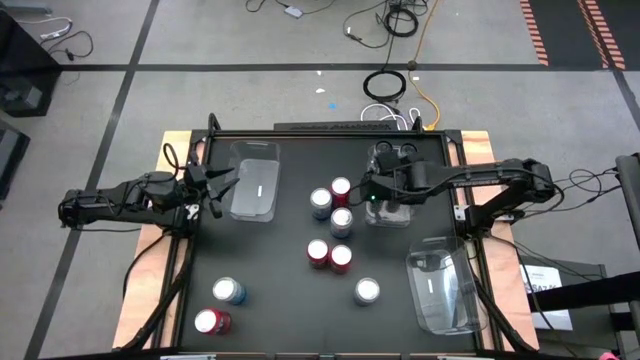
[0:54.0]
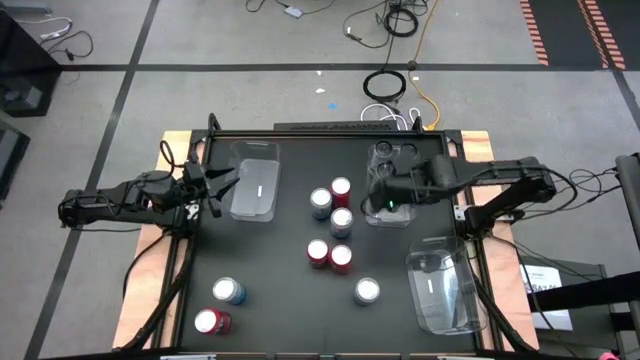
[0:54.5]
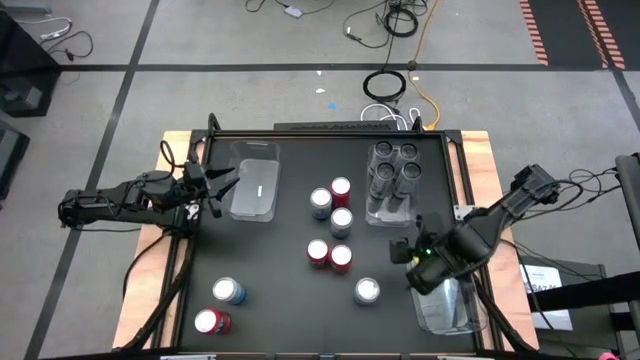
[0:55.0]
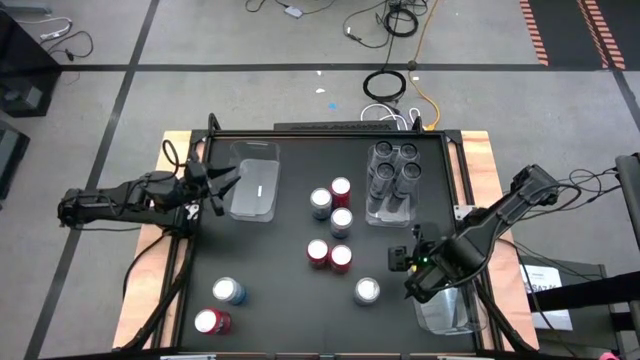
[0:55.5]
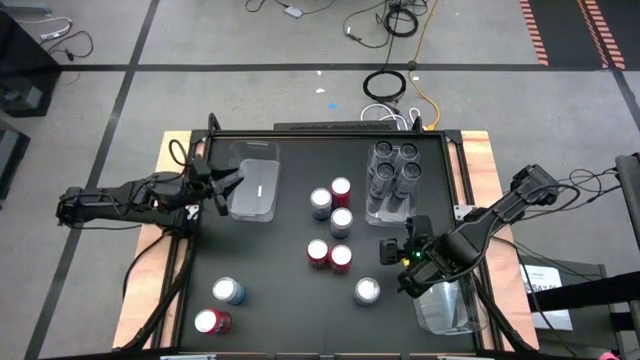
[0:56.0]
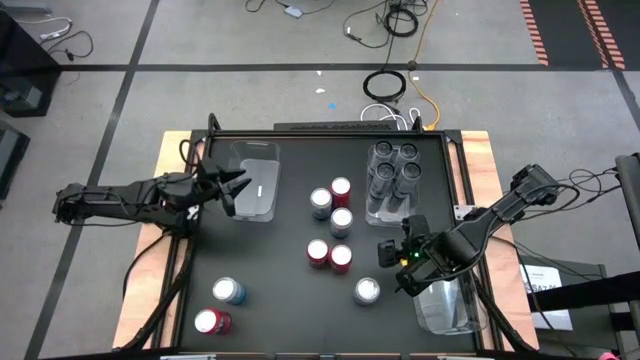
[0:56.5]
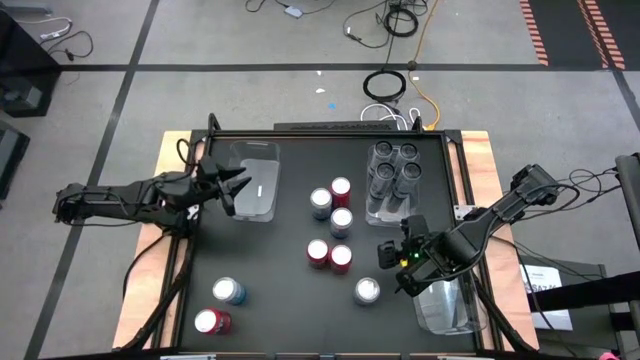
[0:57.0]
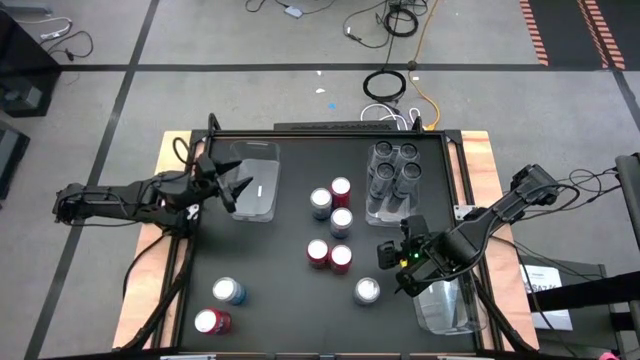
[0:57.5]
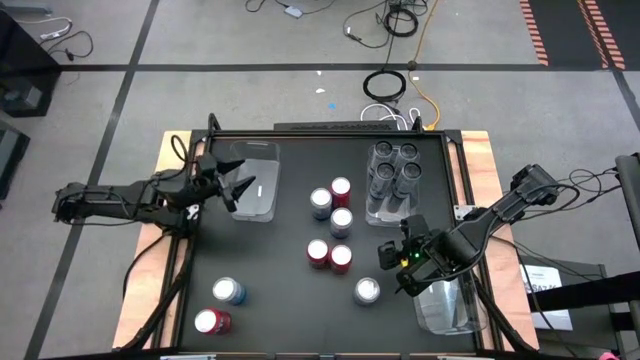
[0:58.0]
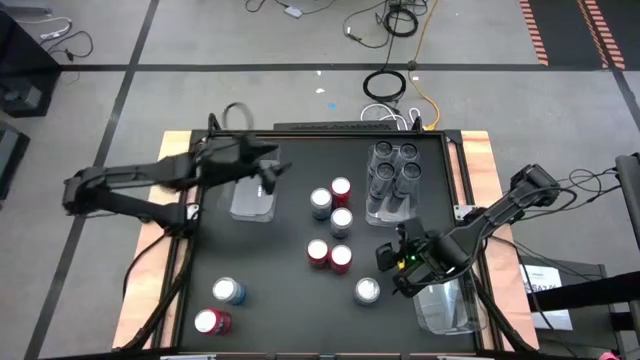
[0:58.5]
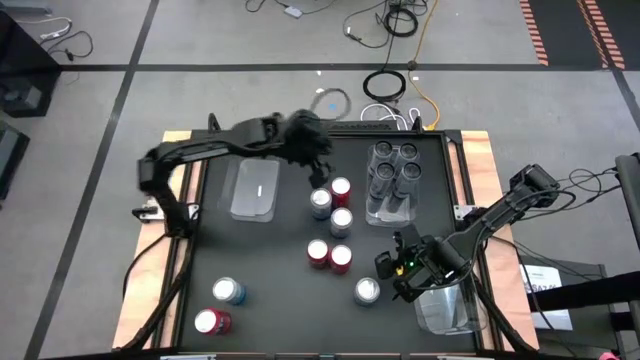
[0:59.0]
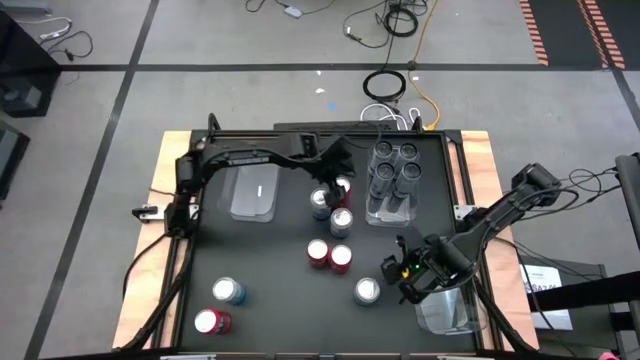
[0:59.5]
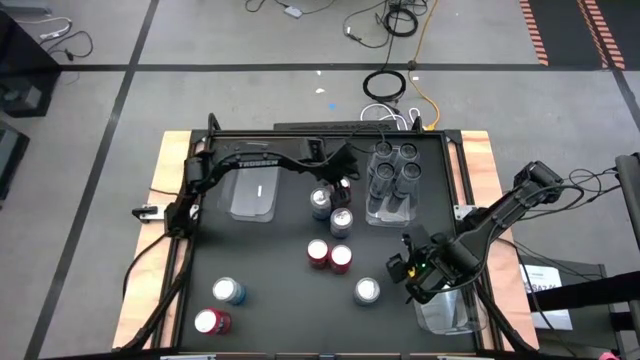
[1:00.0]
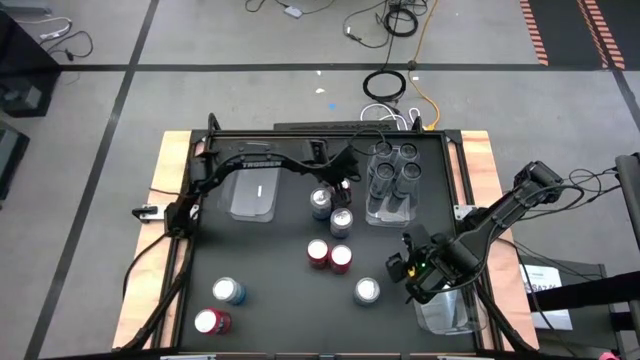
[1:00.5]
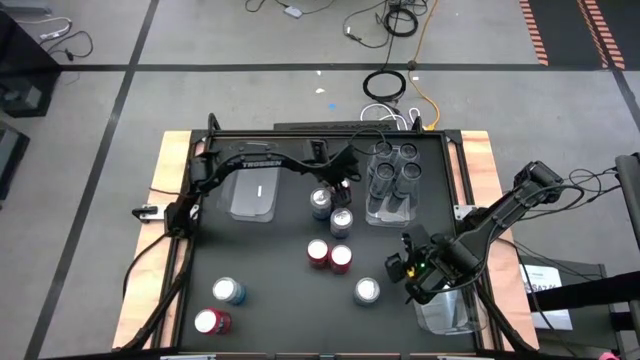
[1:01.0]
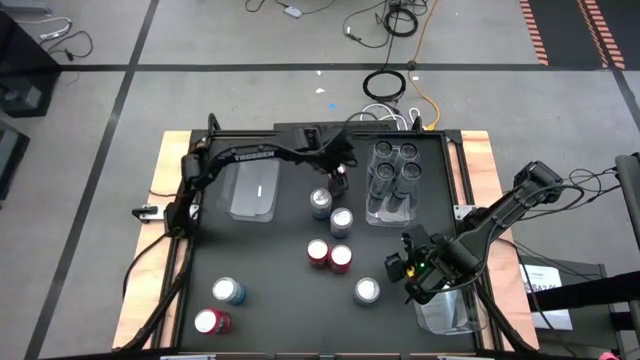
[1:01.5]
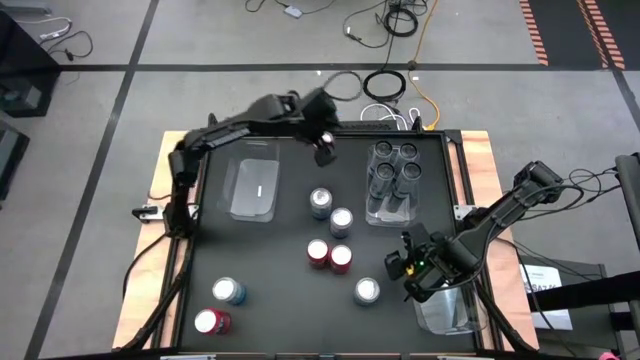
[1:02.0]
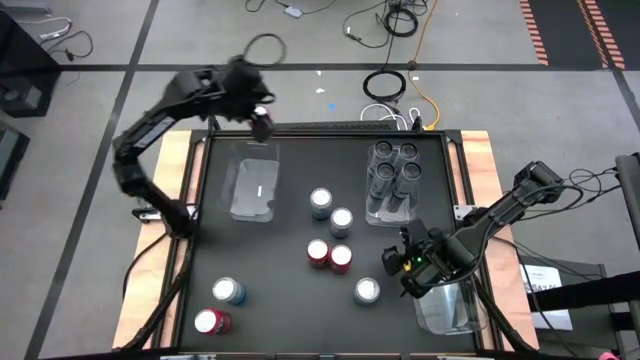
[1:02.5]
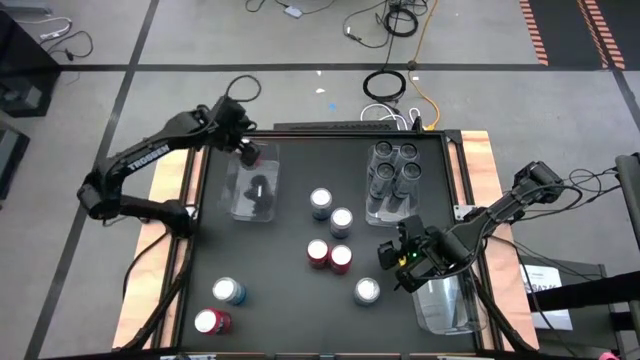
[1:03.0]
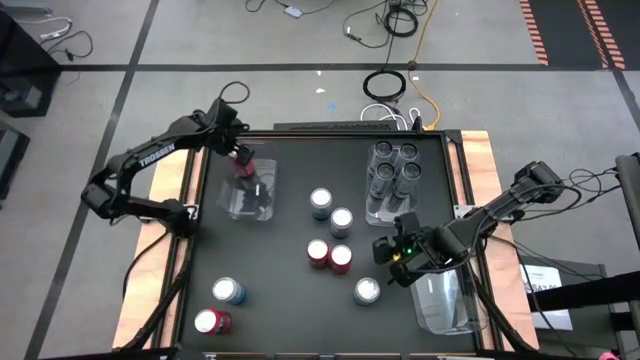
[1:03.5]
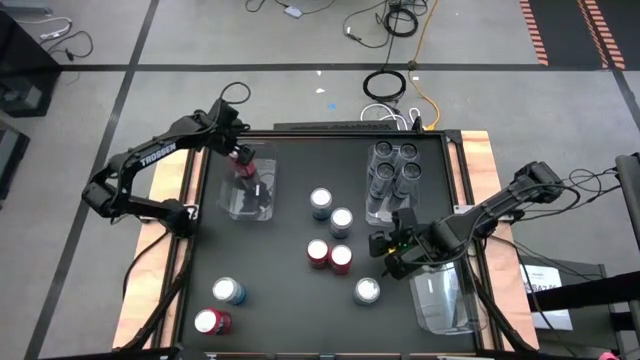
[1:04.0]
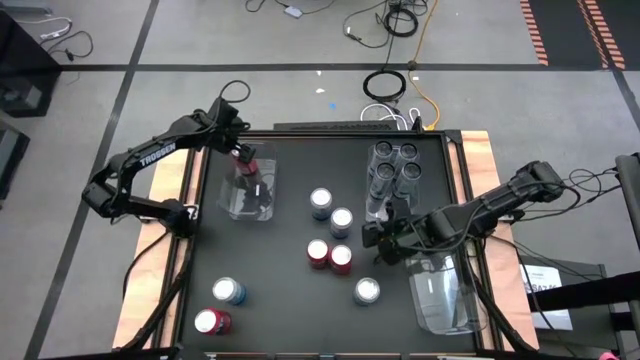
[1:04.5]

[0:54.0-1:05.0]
Task: Sort soda cans
Put the red soda can into the top left transparent bin

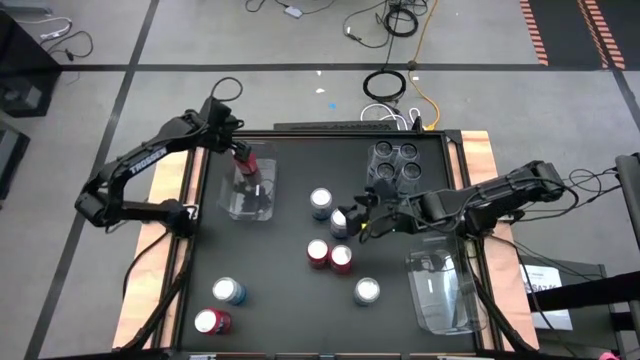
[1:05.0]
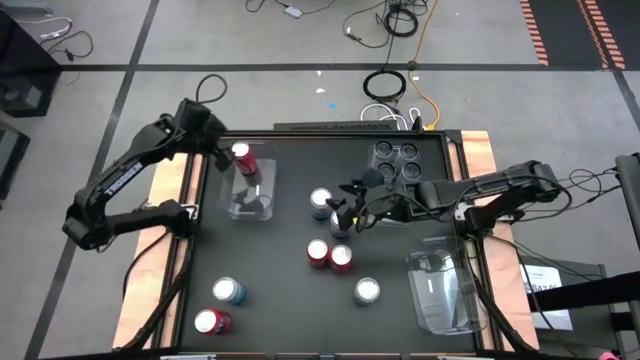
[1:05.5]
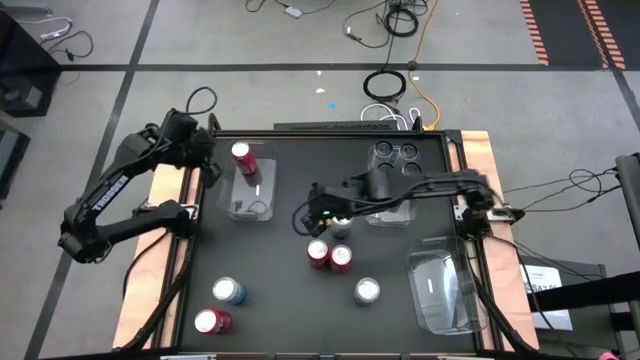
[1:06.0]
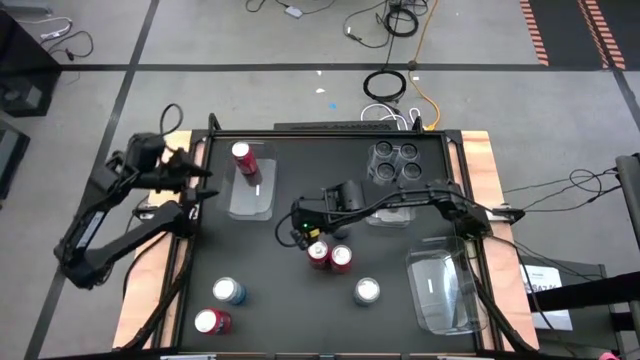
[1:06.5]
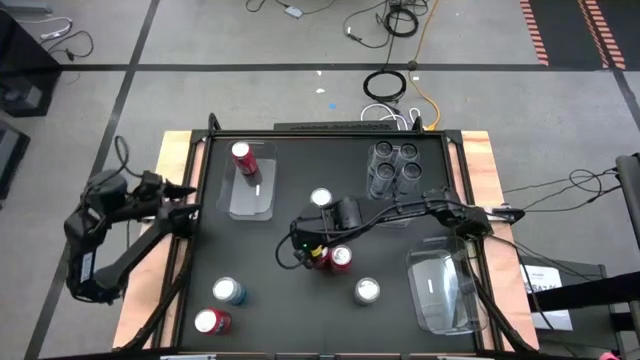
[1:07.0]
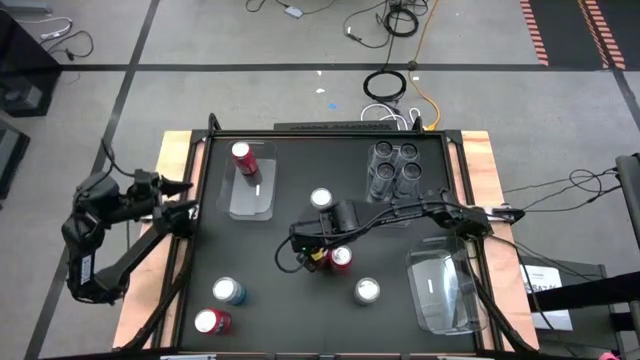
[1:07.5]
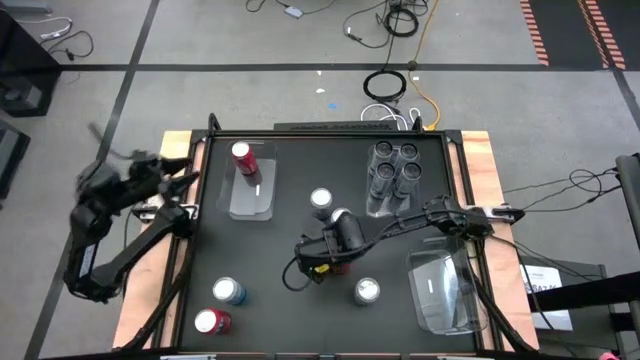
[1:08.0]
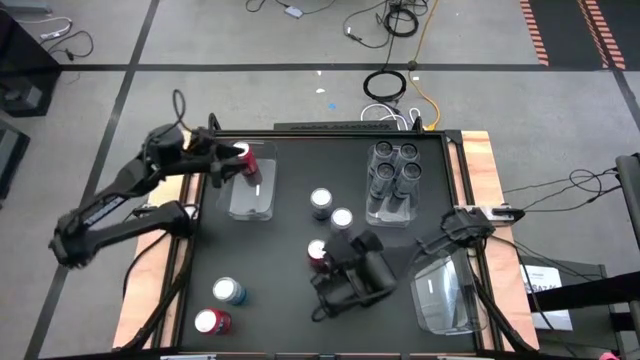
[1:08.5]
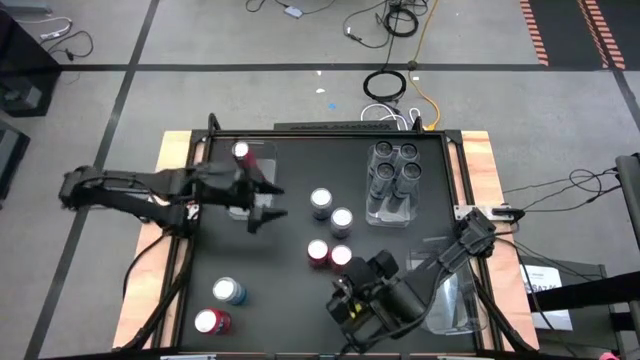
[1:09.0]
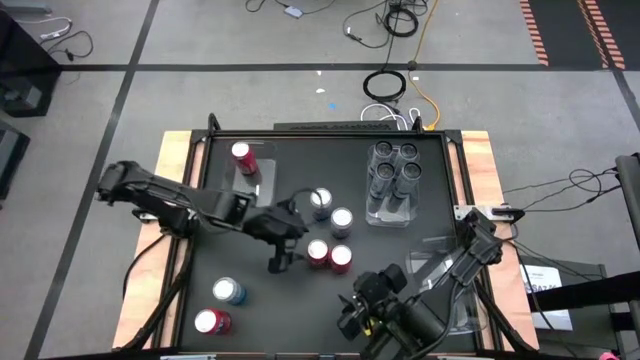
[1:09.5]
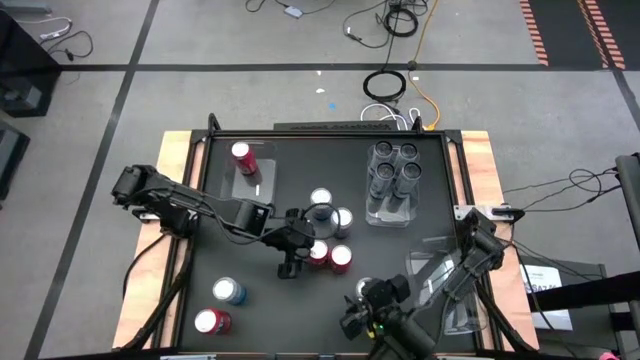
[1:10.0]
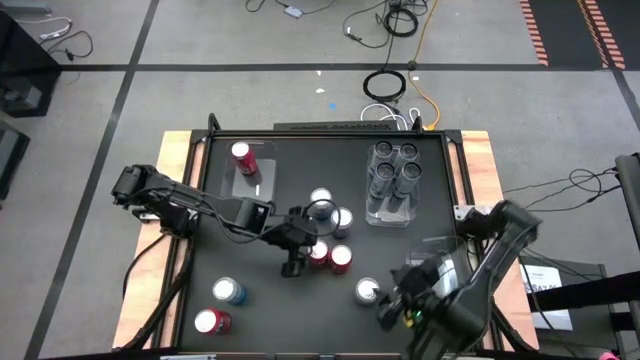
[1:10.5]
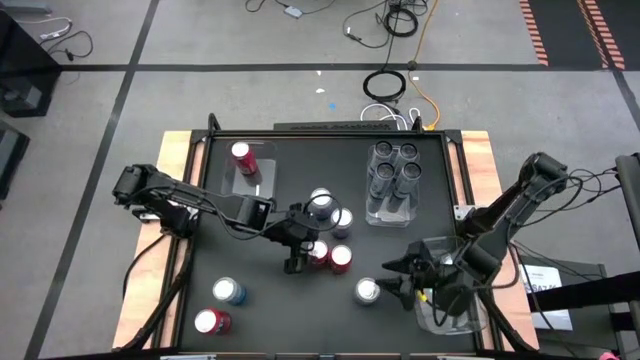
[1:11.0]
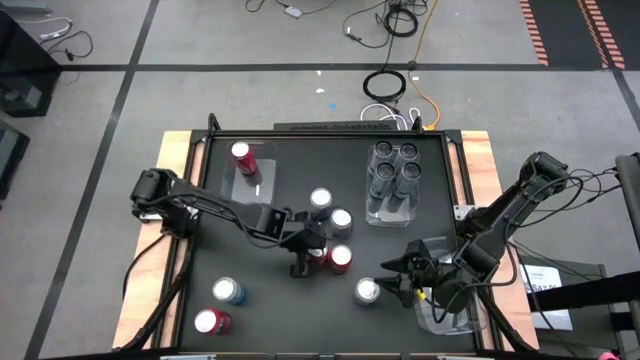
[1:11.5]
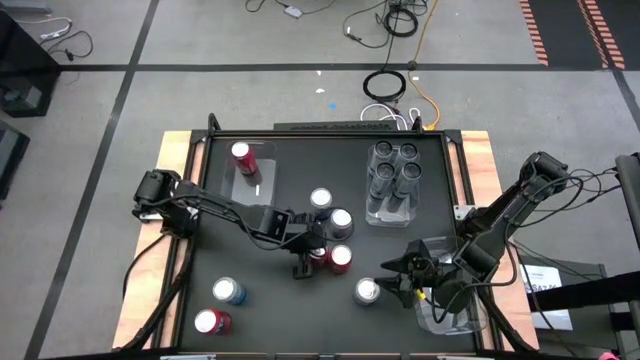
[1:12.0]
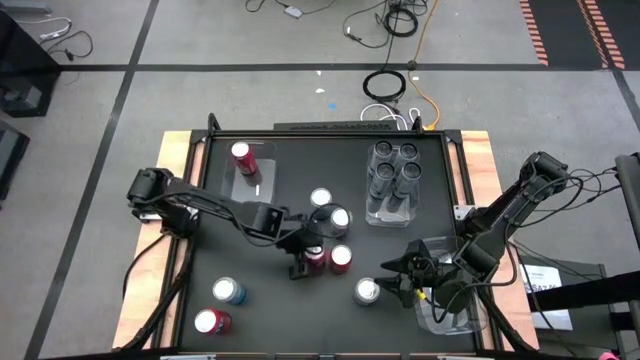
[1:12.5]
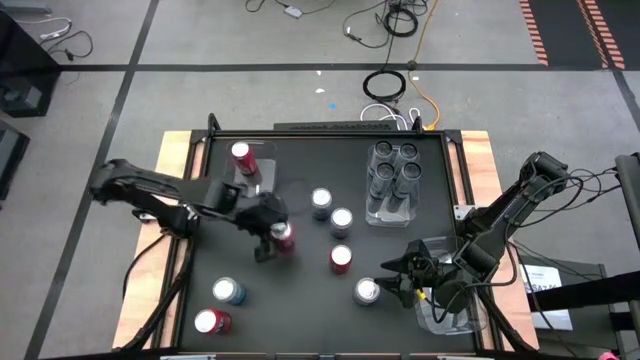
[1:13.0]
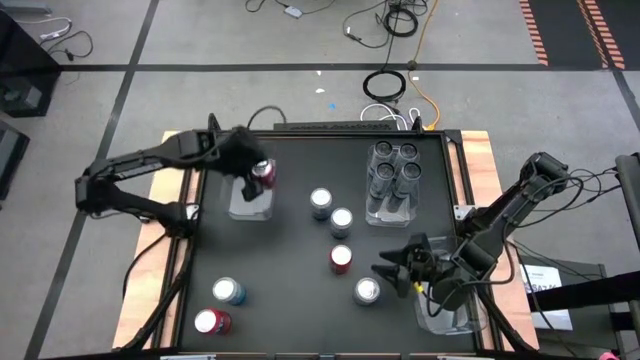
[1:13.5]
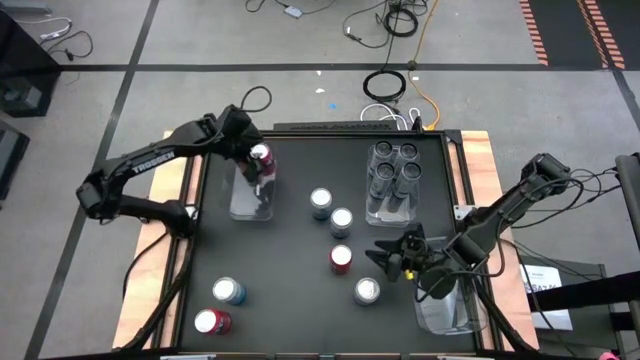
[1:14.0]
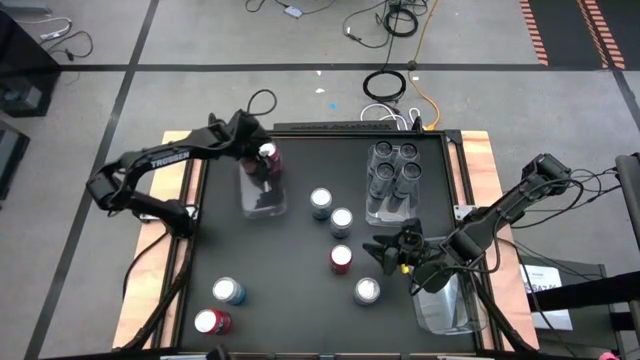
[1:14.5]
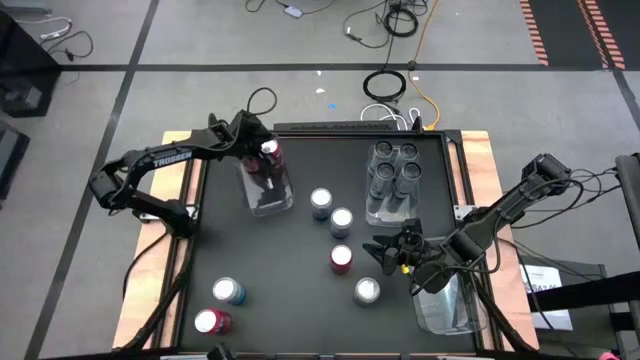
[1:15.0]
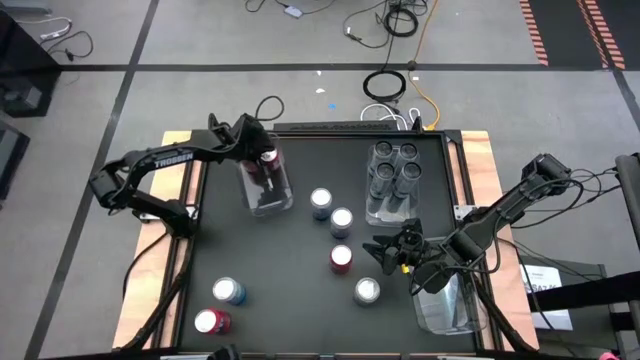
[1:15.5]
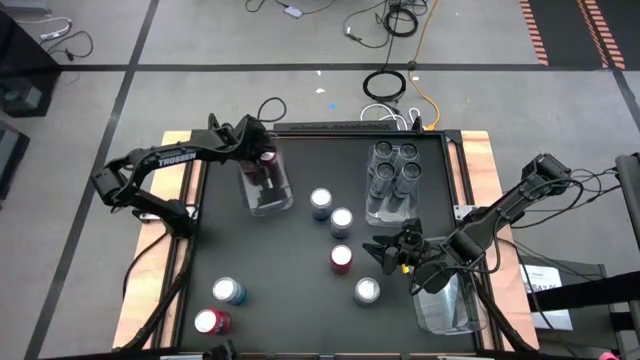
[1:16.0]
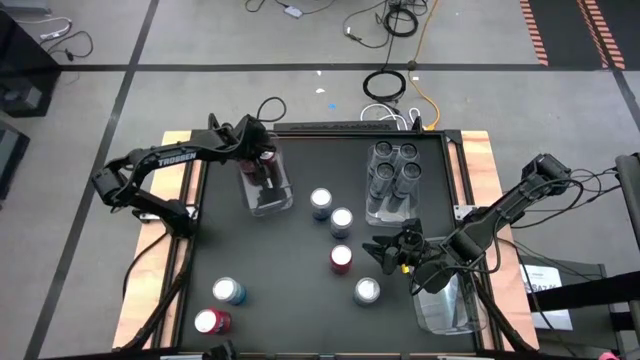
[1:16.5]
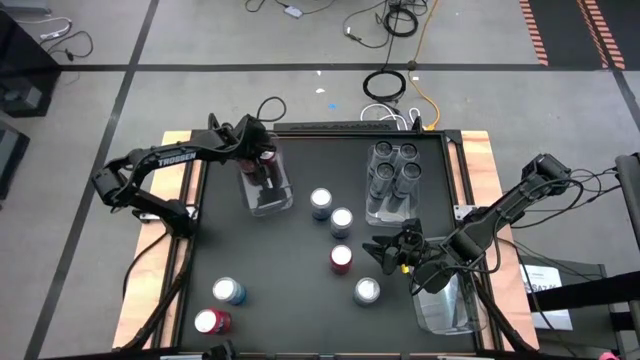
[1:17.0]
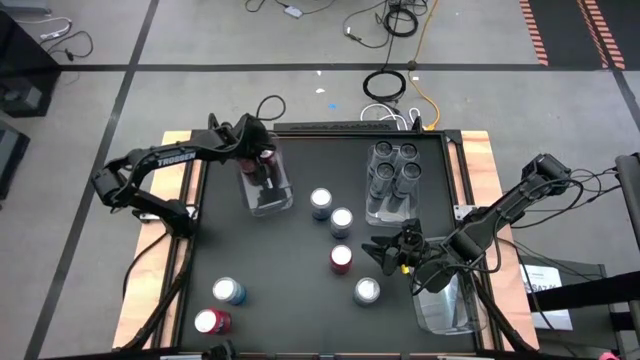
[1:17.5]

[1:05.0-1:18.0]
Put the red soda can into the top left transparent bin
